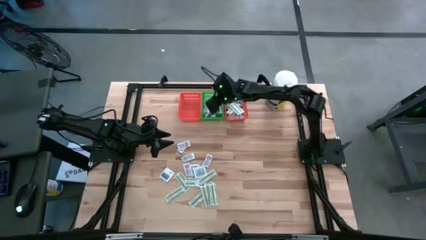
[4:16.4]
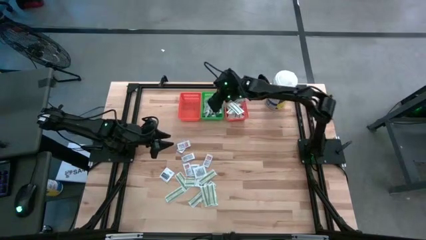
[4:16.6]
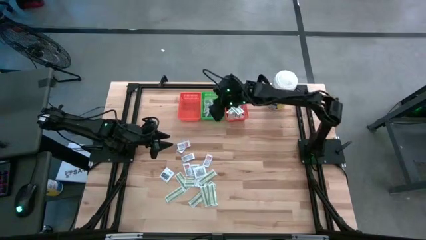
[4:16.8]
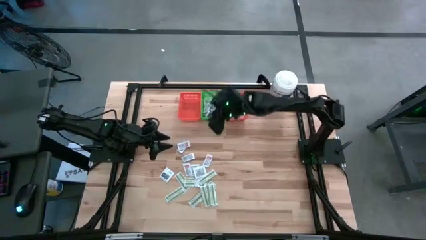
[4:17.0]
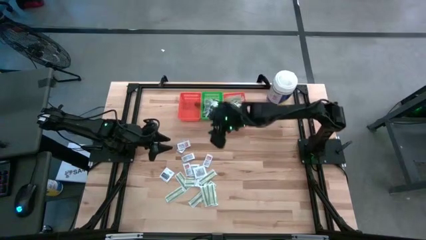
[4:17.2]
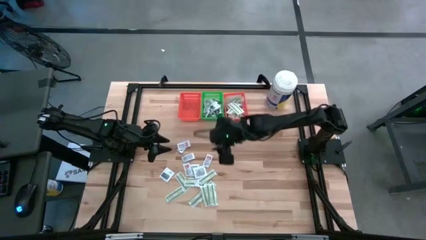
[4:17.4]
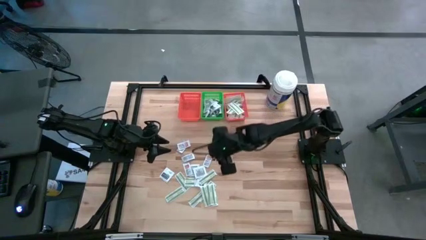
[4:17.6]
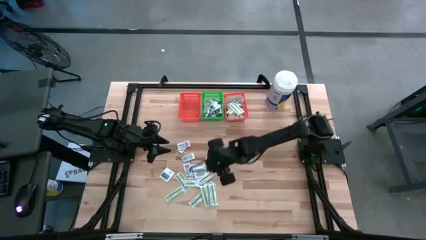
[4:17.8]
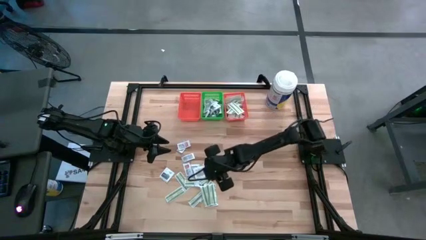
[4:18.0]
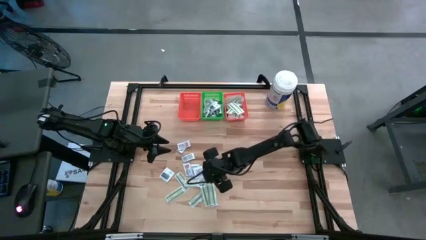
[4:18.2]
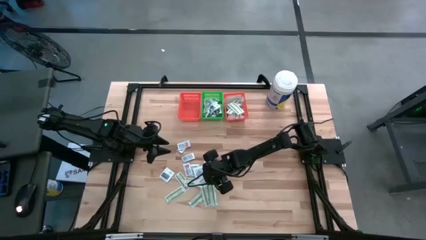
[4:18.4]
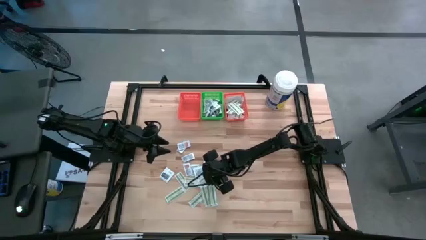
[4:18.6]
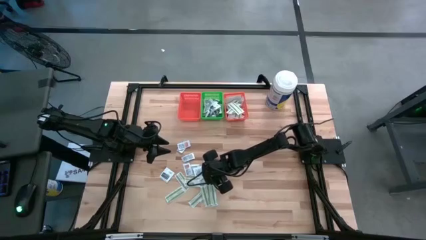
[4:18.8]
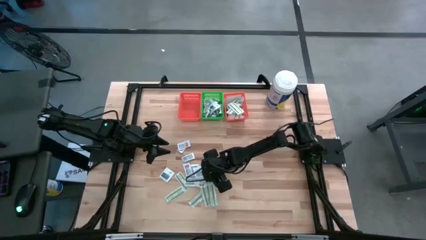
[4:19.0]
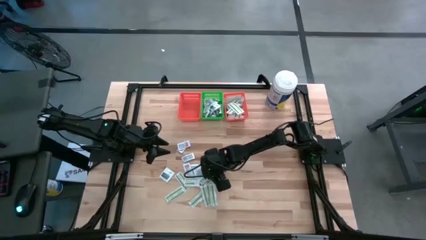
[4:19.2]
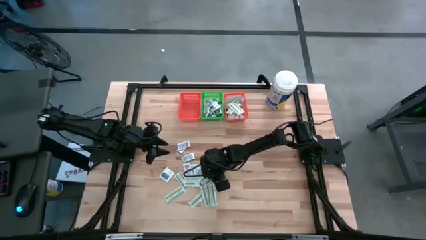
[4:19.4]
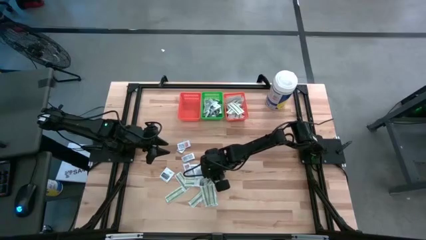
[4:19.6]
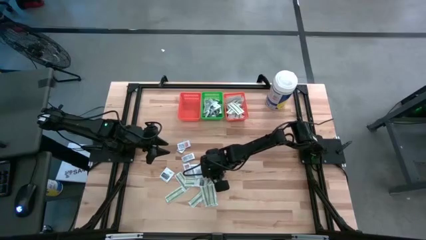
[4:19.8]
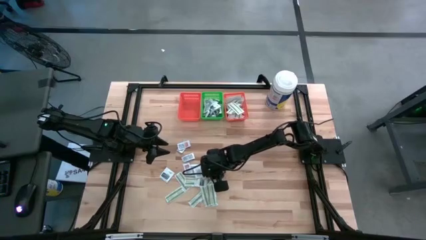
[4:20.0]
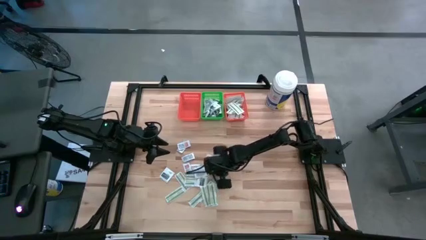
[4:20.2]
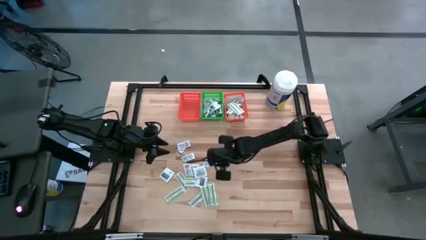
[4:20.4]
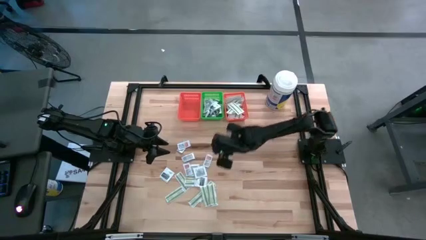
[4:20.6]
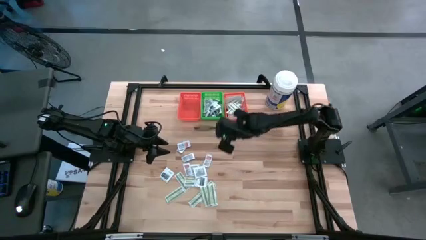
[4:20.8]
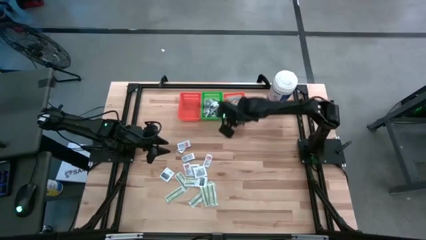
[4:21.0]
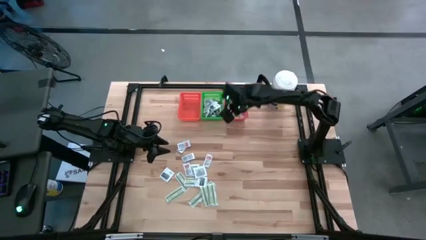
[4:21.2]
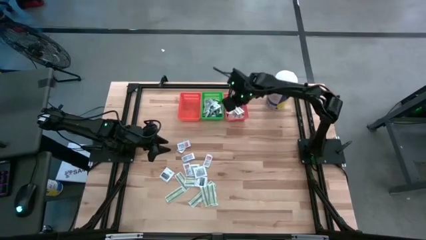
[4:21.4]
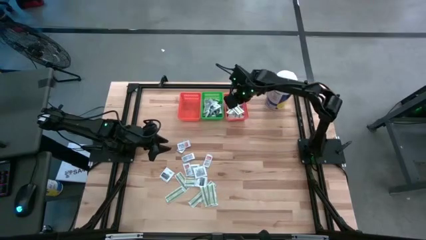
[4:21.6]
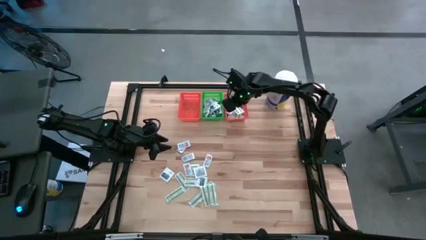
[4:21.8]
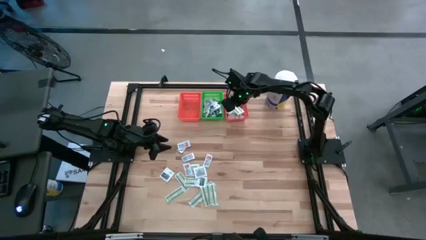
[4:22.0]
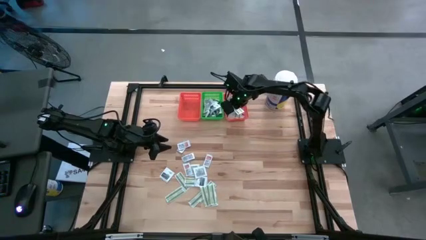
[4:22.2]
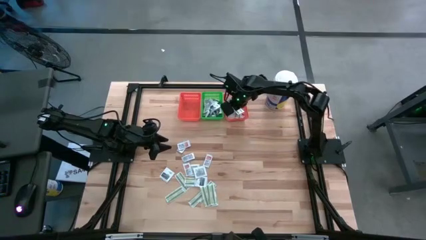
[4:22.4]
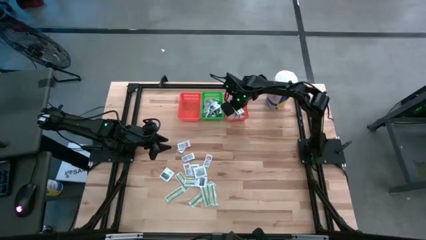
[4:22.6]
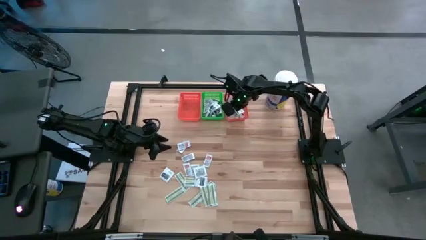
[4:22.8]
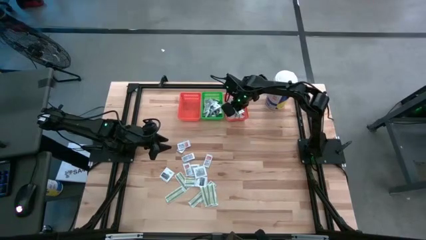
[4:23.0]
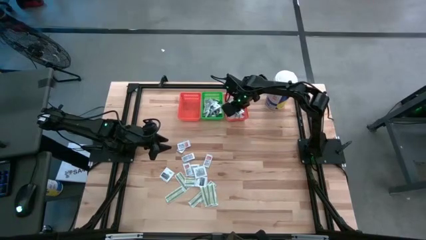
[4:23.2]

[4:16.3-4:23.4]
Task: Pick & Place First Aid Supplies
Put the bandage pack into the right orange bin

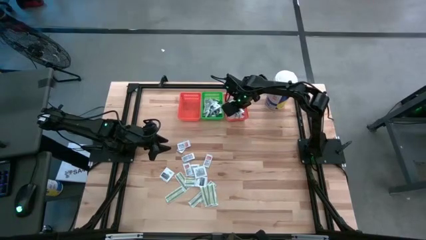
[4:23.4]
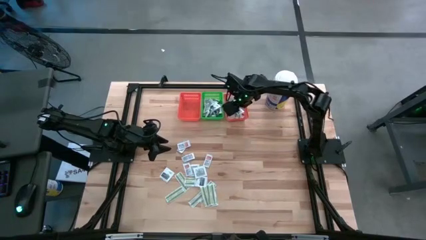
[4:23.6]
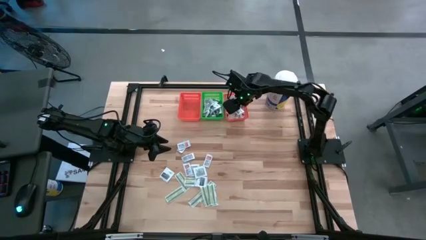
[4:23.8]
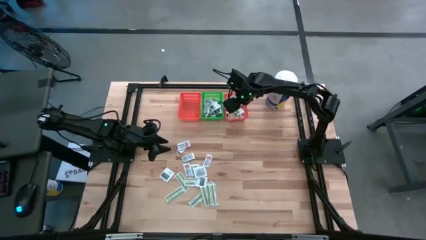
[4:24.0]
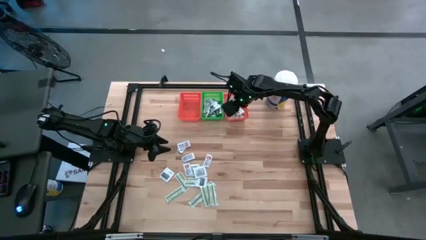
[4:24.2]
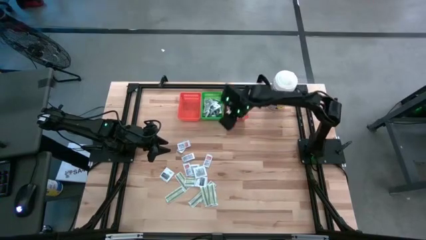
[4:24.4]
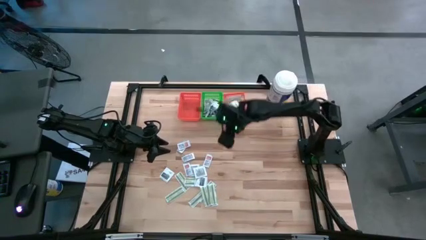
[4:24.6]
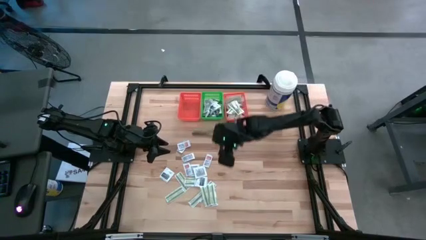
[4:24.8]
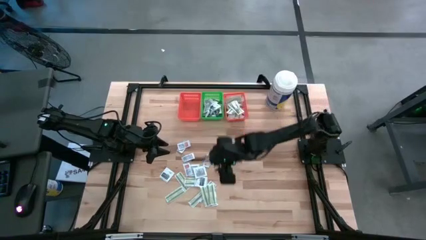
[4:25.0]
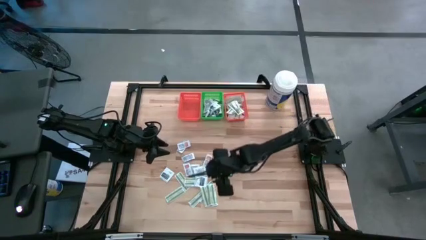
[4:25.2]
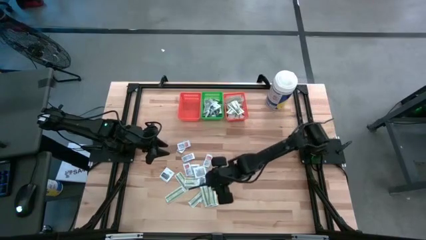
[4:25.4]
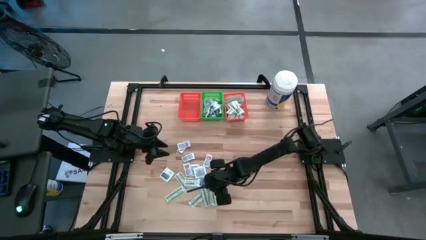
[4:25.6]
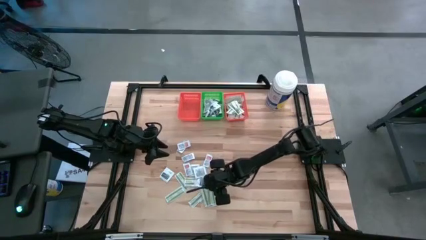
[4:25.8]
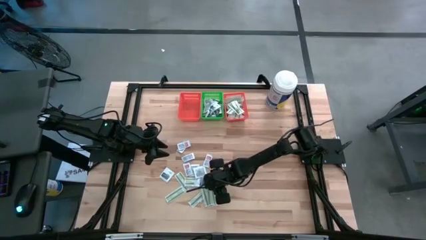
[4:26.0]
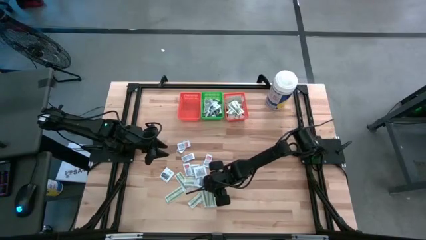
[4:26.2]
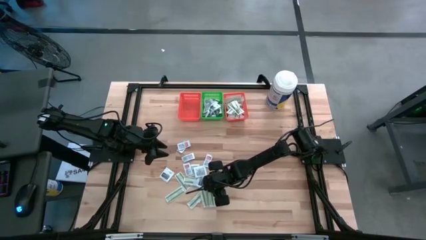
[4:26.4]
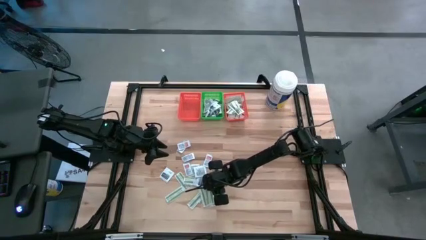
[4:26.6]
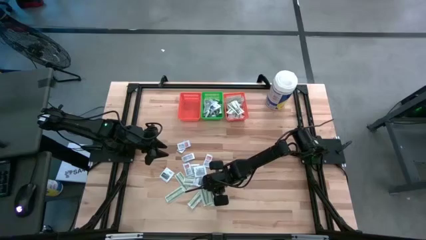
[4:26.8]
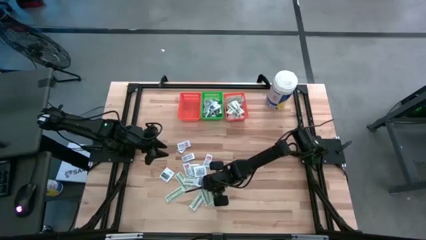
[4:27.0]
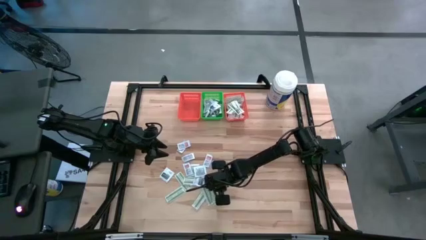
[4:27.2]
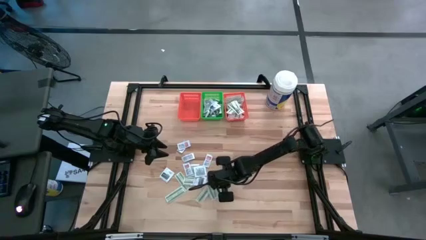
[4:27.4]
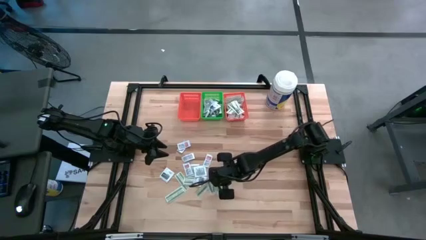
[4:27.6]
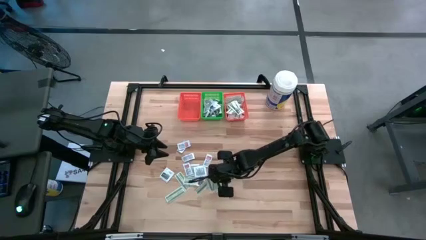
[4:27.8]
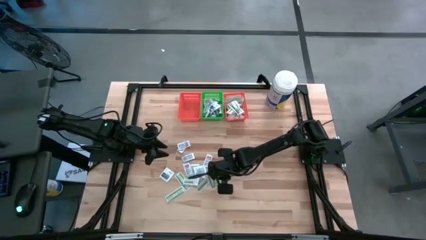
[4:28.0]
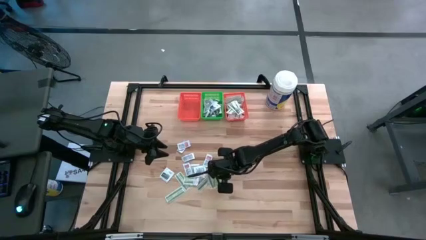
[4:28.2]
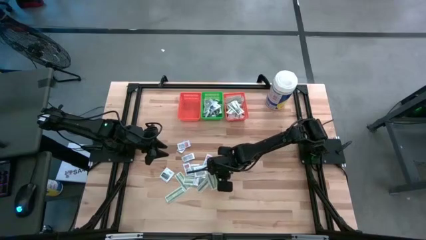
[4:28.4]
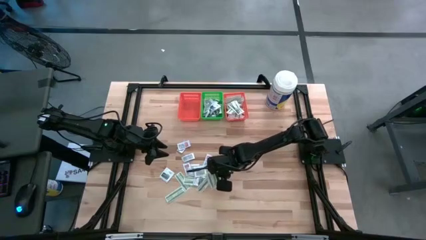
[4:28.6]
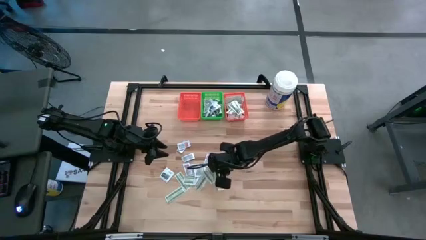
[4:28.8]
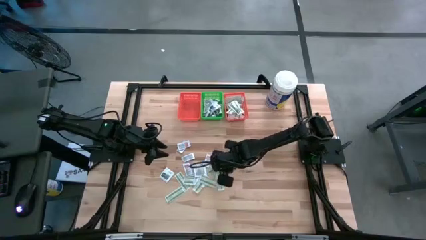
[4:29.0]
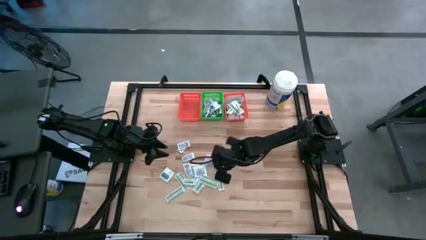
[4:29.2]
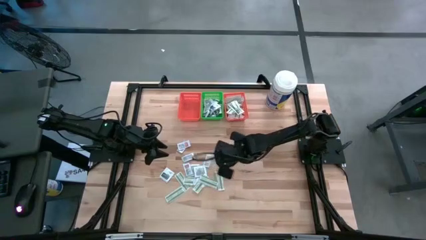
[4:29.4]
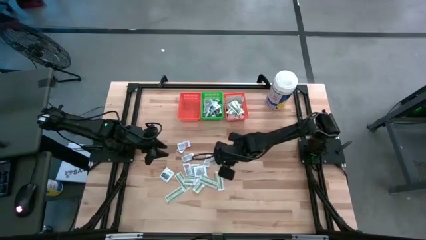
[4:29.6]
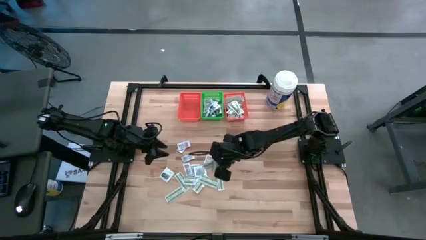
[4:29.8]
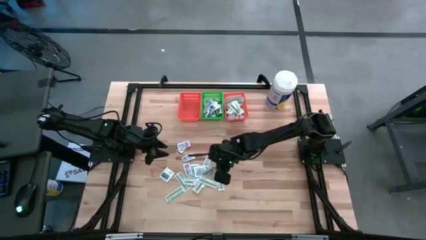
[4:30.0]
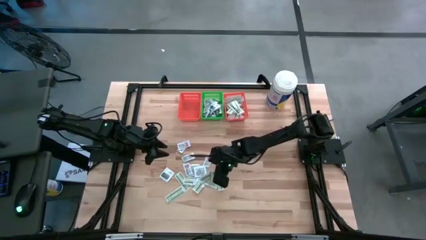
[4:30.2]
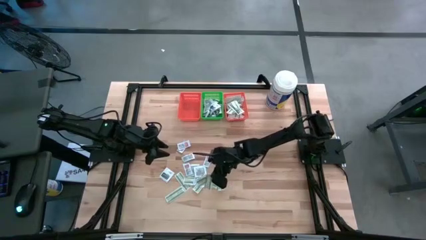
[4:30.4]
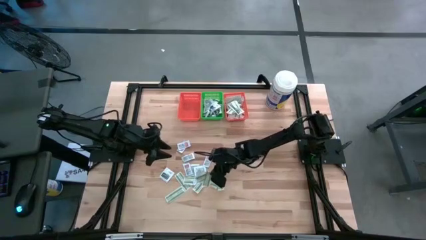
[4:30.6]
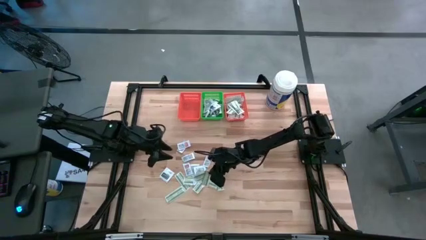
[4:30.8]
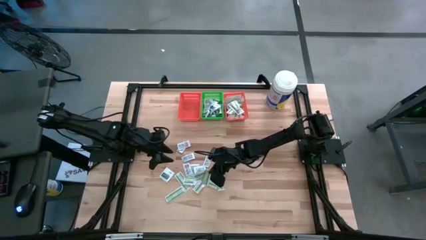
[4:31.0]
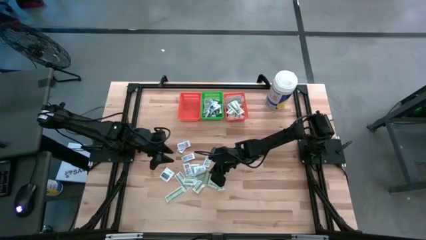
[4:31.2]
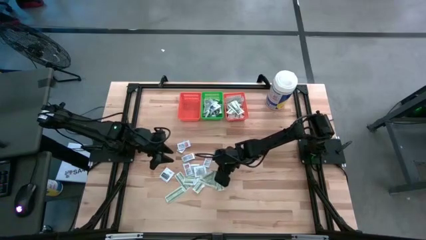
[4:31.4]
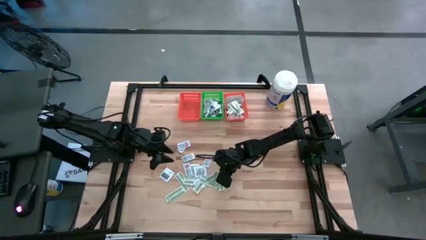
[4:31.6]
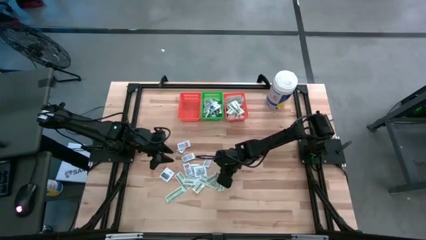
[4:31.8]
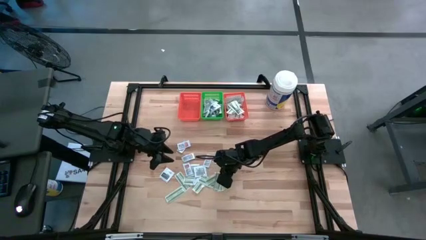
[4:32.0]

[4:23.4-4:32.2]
Put the bandage pack into the right orange bin
